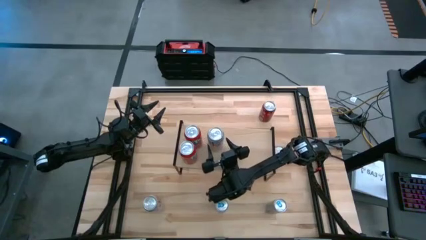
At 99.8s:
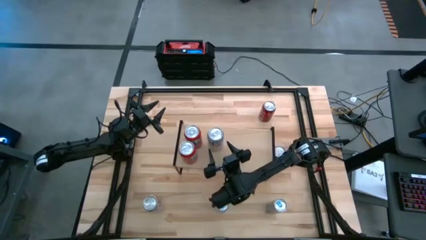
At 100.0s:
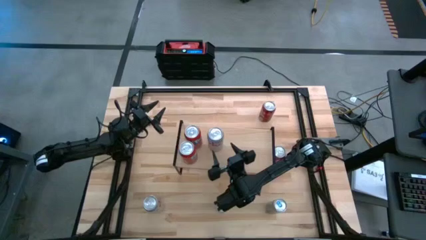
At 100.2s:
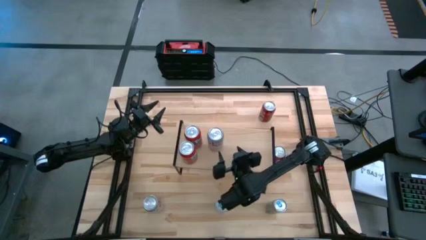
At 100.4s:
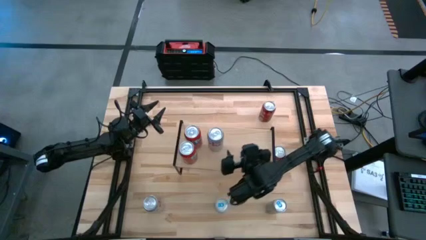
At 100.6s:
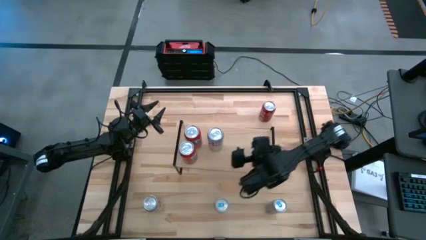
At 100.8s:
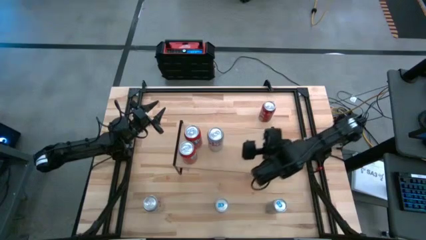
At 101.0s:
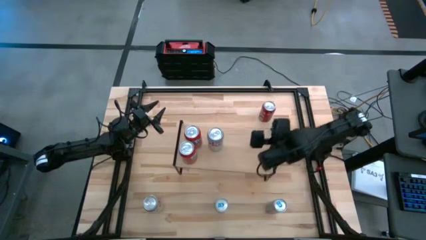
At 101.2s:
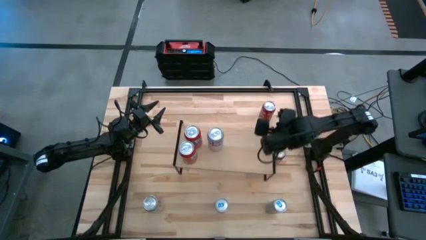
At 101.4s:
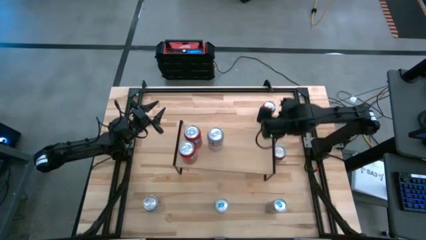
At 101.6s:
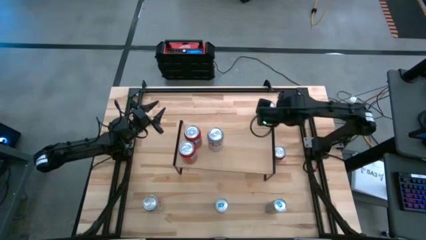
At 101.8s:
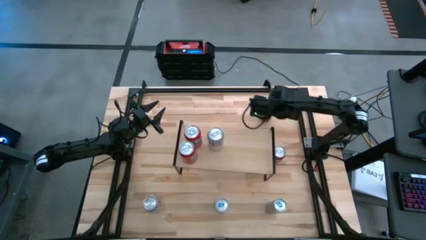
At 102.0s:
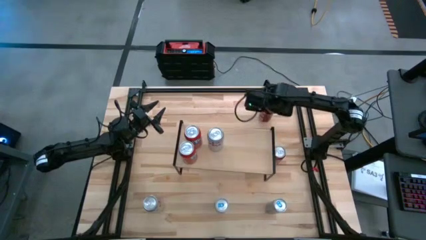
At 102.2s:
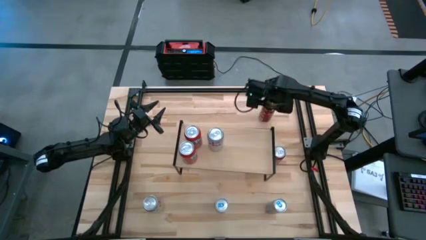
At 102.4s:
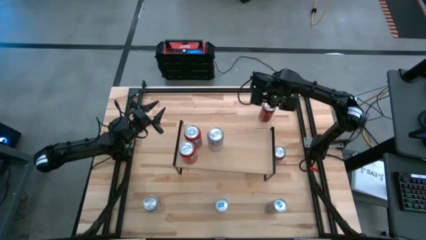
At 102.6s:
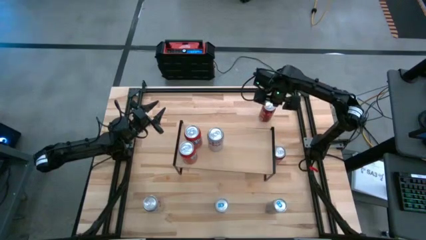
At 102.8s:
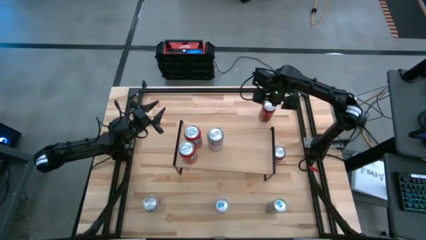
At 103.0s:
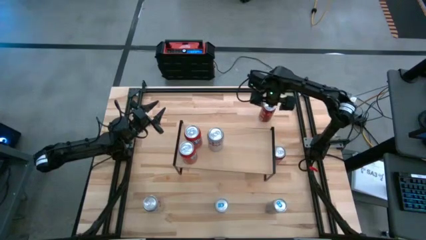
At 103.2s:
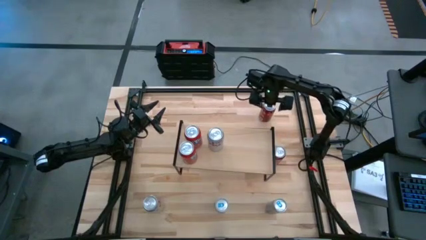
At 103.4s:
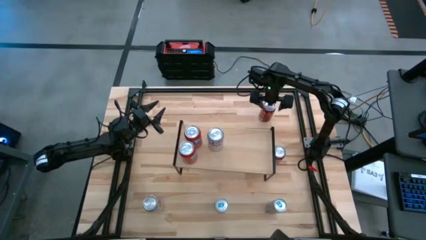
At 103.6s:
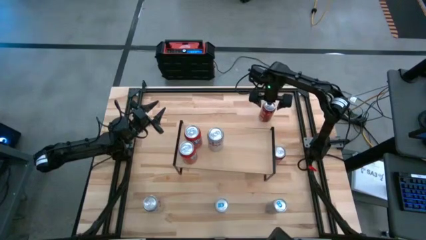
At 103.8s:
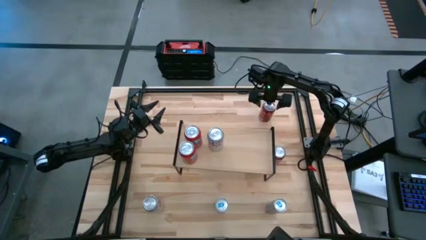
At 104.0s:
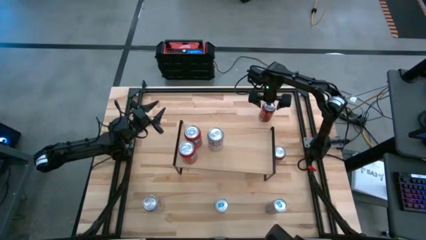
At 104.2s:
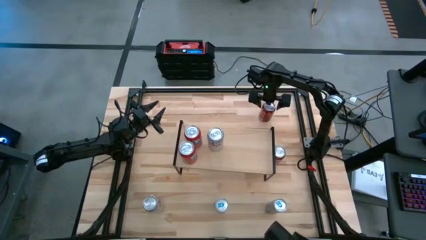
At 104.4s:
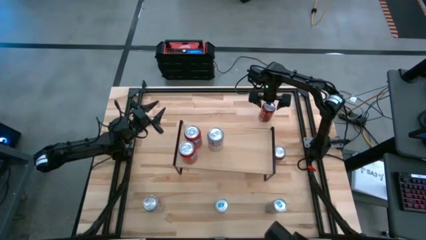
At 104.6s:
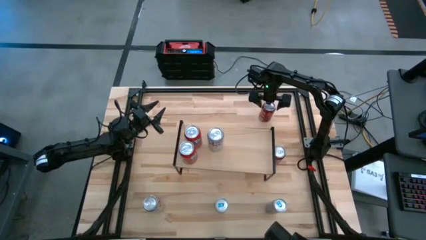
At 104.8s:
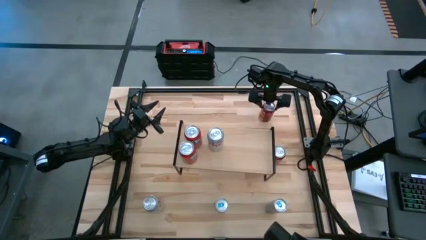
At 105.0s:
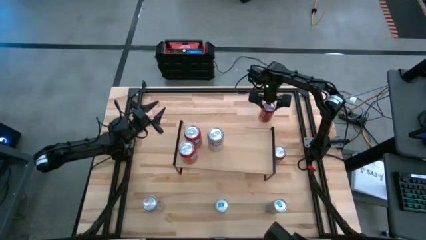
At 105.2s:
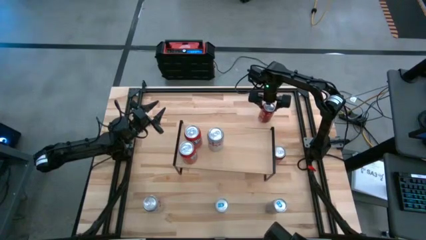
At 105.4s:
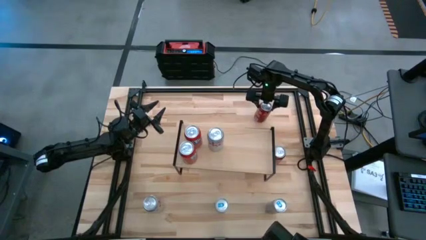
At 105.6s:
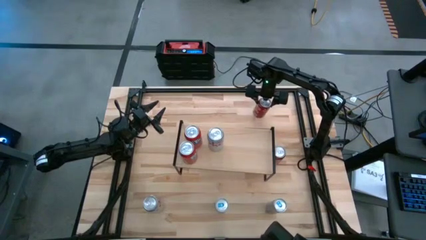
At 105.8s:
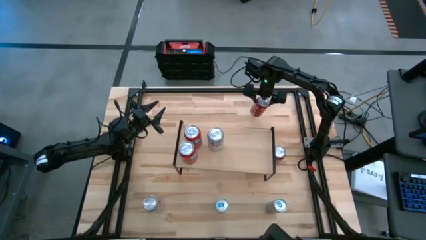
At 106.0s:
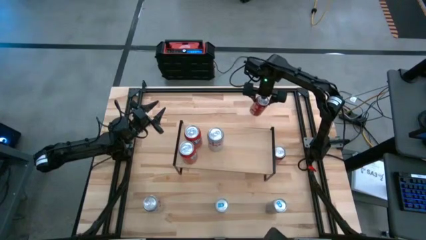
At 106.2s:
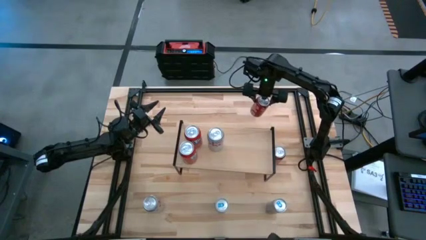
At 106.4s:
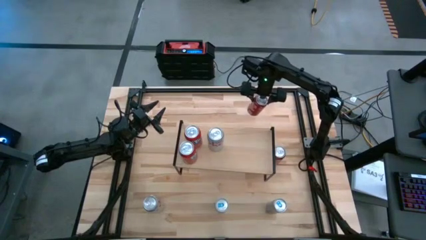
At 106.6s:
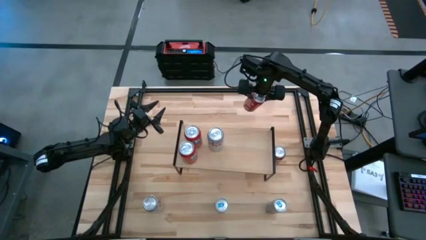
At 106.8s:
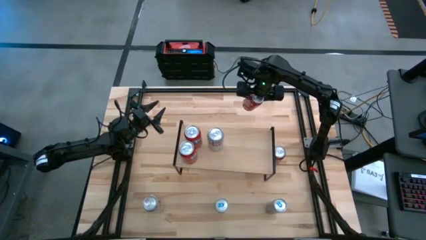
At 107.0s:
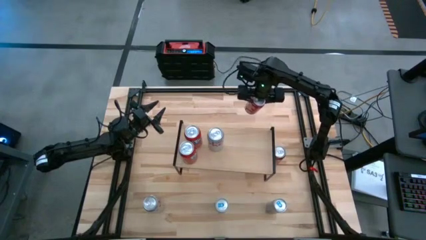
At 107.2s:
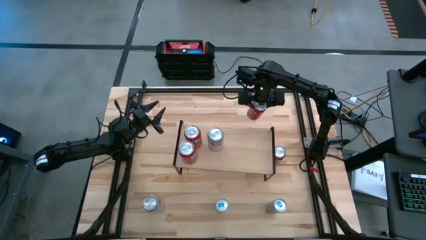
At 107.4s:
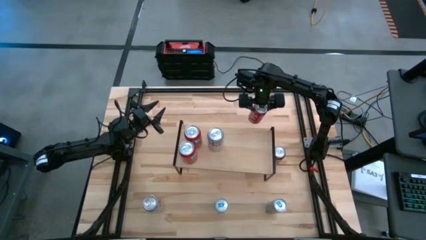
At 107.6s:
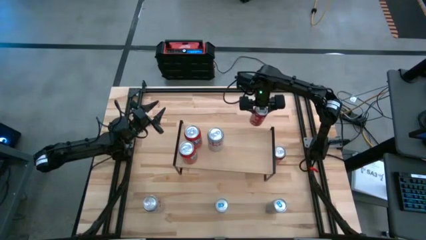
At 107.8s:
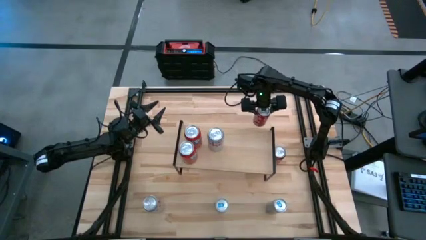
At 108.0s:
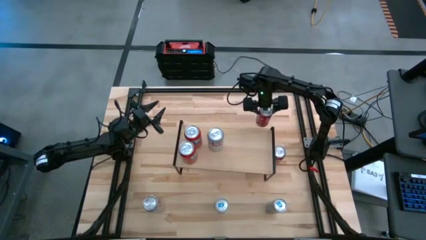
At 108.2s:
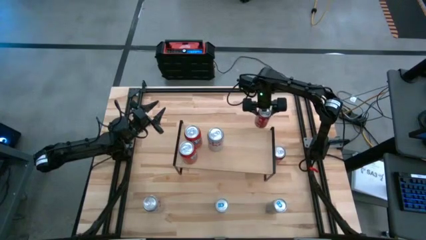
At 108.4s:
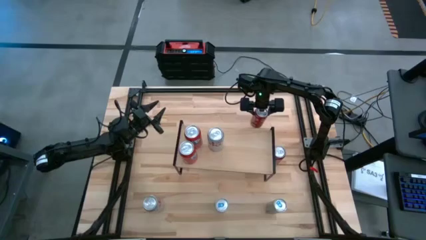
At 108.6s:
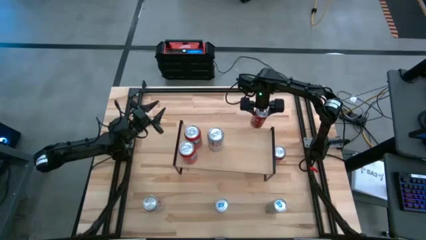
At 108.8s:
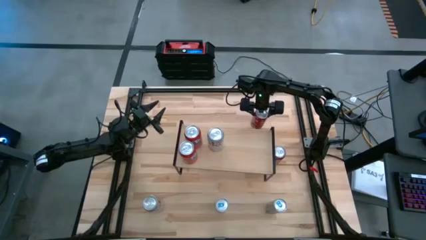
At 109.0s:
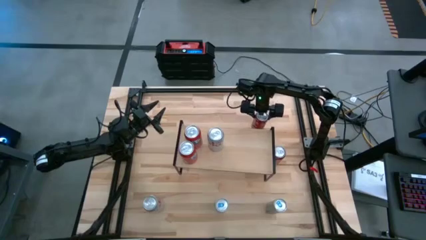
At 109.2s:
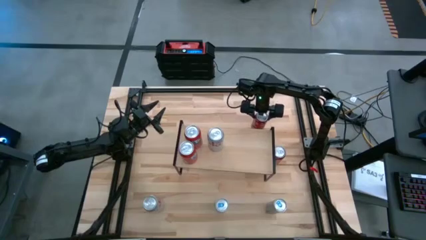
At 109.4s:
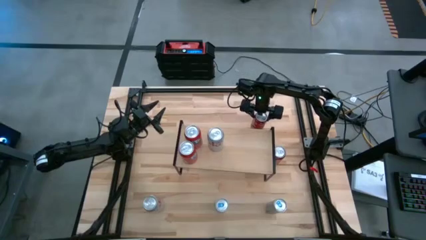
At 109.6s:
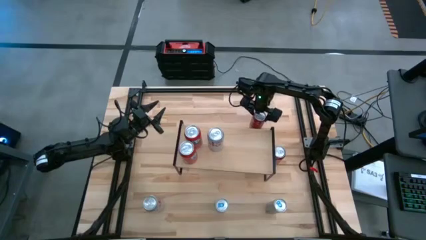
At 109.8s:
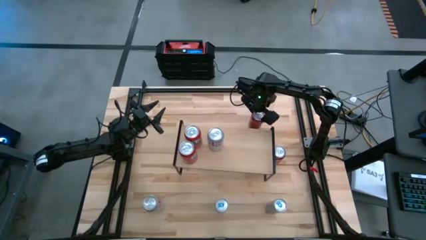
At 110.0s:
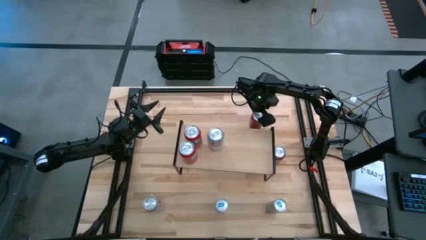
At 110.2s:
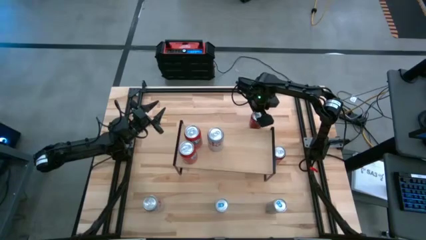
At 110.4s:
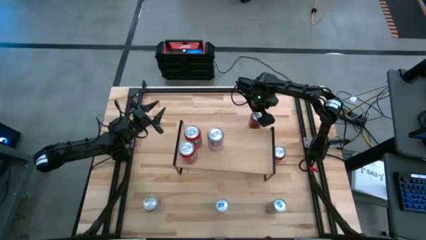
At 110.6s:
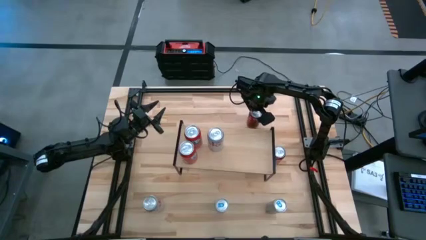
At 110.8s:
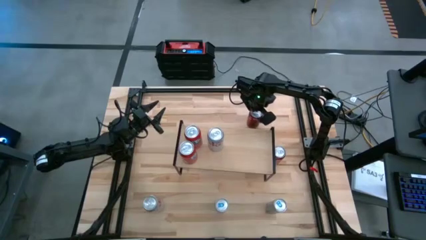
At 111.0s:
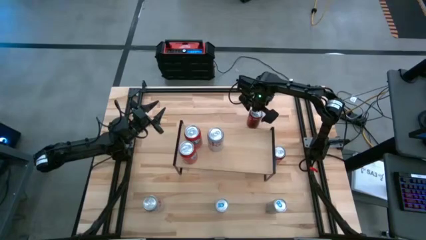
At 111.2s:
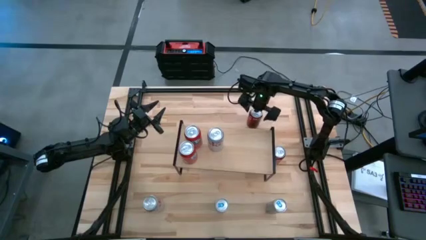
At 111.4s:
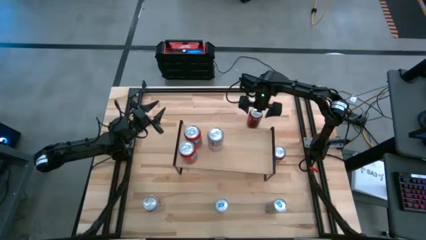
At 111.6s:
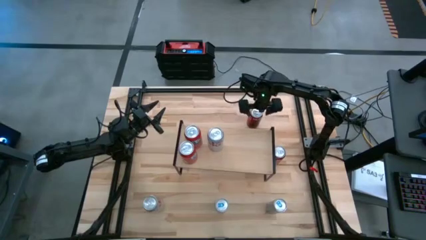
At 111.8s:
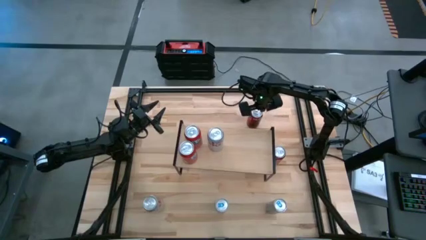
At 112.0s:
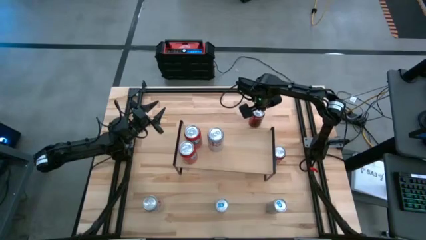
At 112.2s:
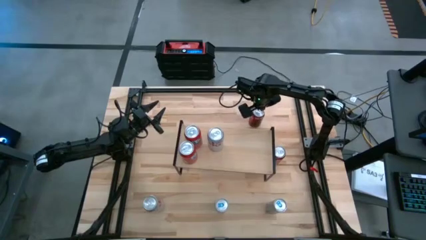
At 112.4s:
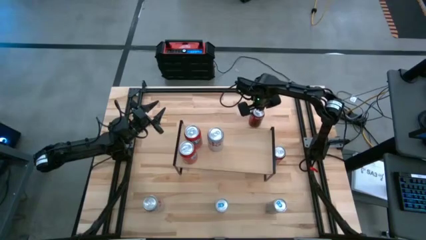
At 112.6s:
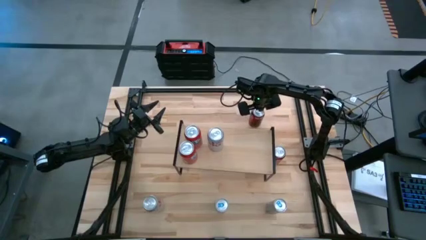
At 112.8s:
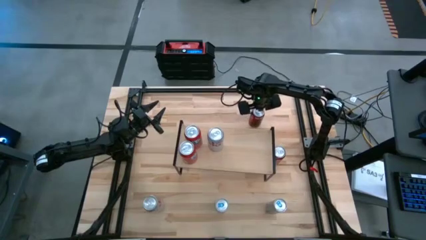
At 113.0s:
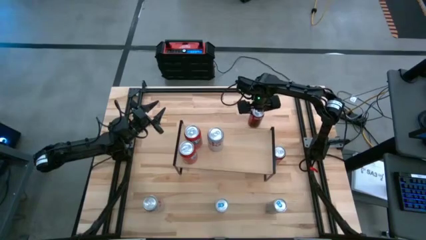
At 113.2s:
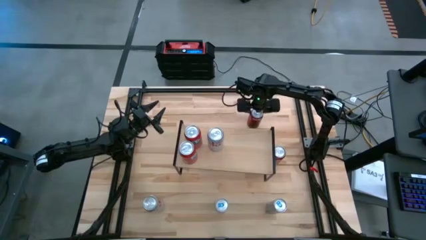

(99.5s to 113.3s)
Task: Place canned beverage on shelf
Put the top red soda can on the shelf

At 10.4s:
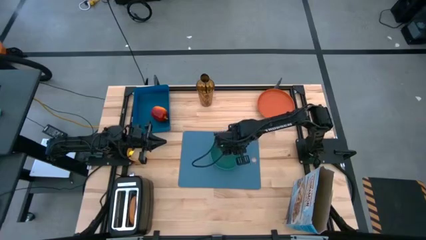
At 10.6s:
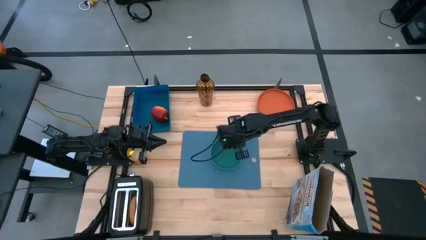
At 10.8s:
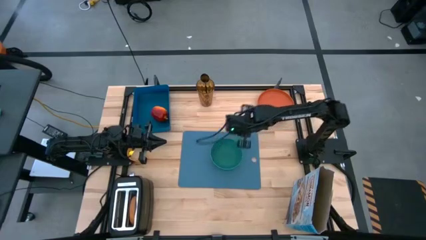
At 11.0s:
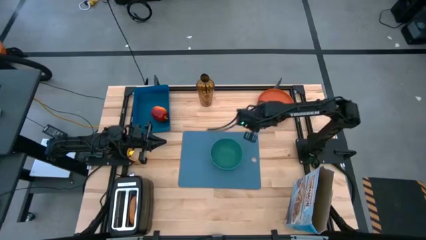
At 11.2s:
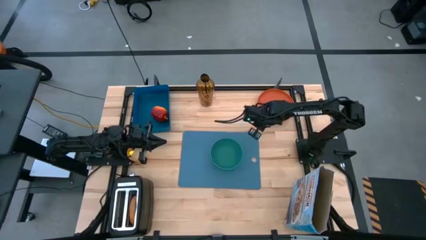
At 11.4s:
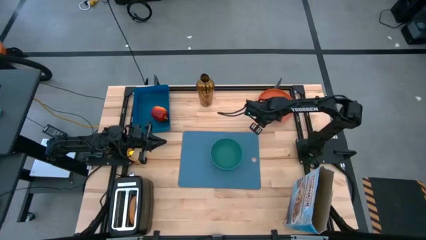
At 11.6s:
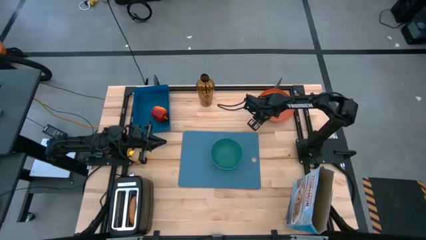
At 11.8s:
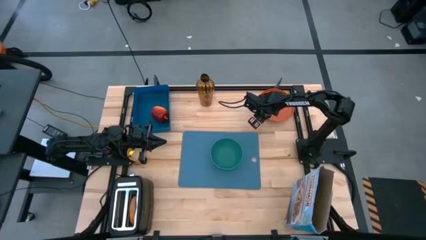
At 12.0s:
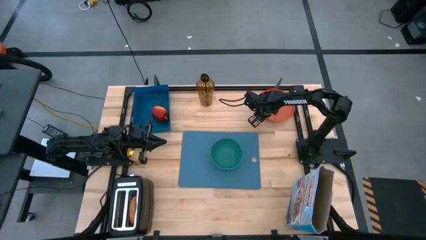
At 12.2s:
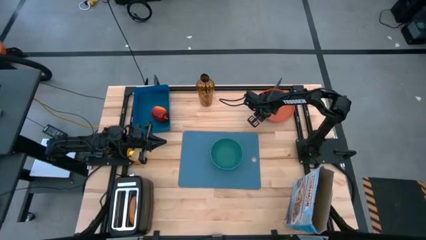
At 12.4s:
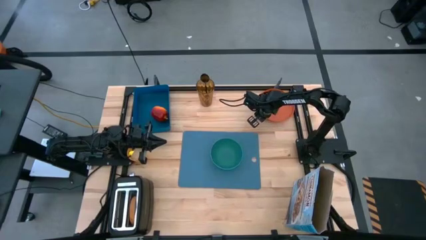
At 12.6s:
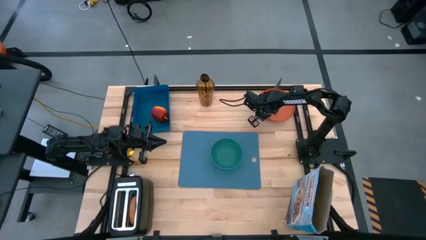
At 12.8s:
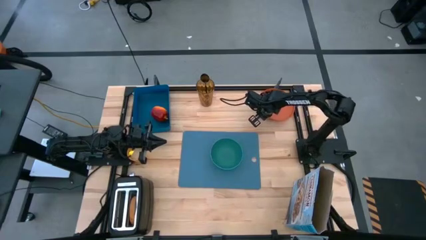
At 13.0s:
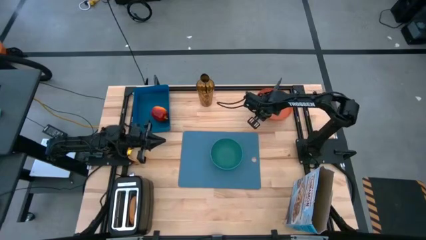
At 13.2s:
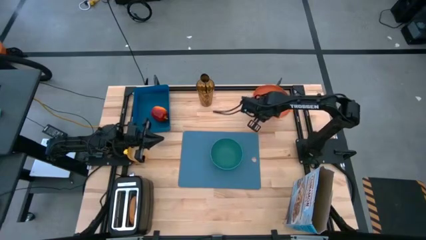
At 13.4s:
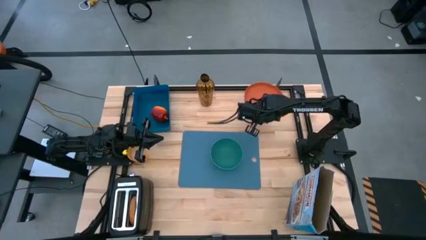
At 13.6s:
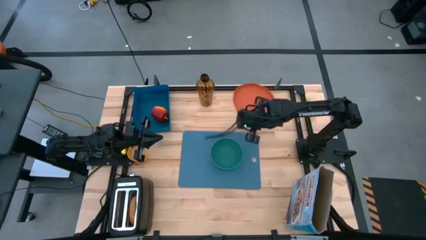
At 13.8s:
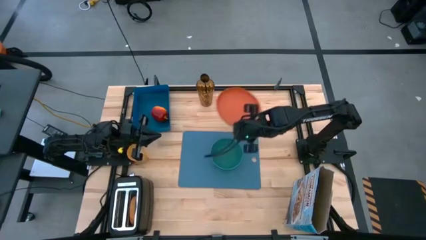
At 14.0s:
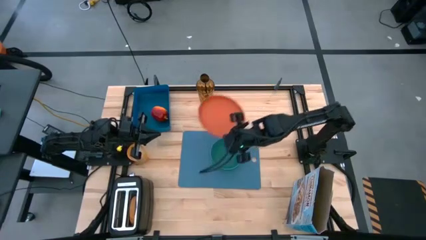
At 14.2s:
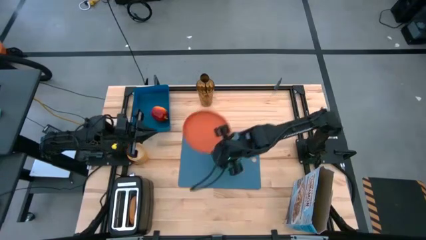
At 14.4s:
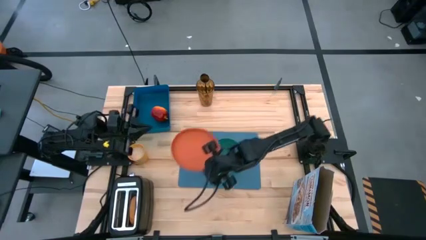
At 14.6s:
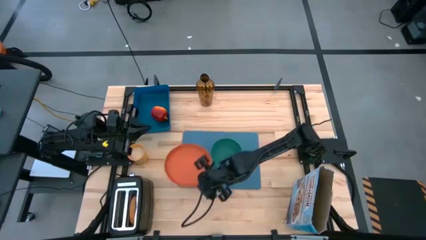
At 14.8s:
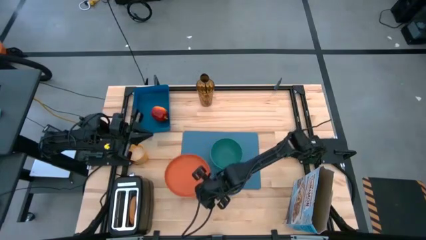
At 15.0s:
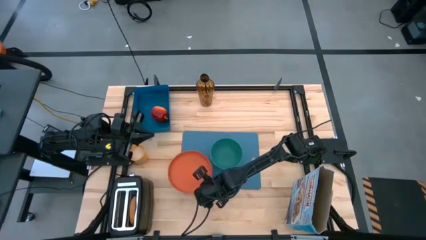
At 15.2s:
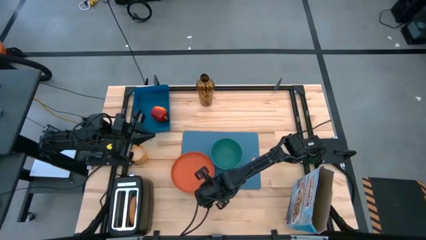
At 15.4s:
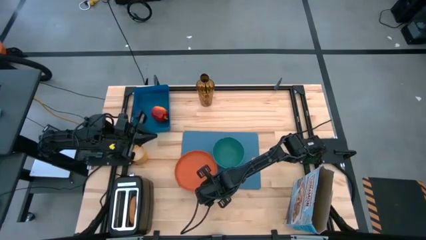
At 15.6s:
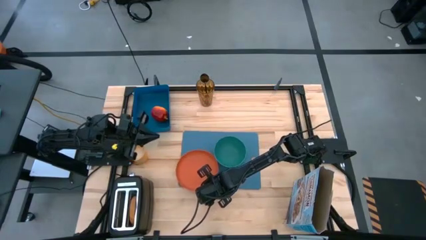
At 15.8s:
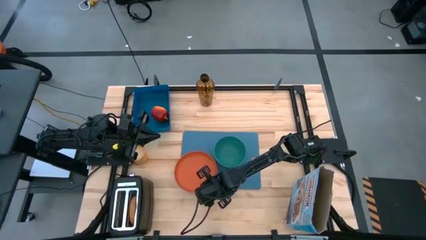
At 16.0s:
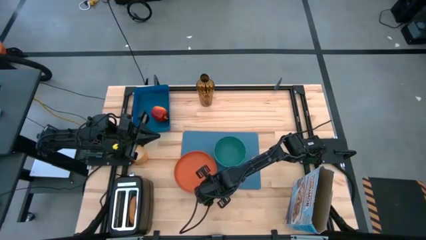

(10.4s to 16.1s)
Task: Arrange a breakfast setting
Put the orange plate on the blue cutting board to the bottom left of the green bowl
